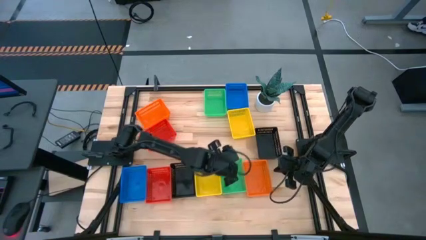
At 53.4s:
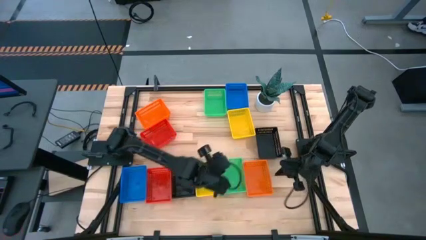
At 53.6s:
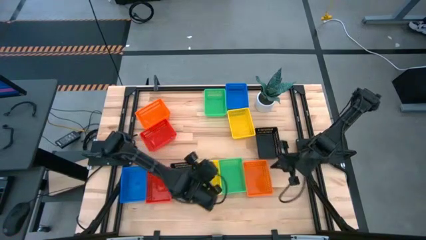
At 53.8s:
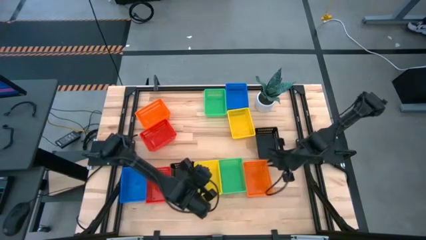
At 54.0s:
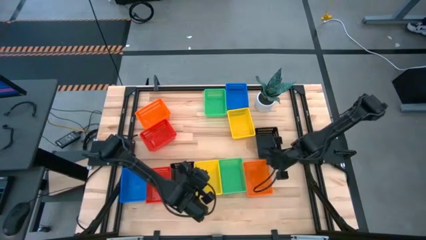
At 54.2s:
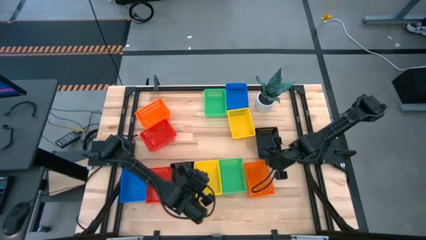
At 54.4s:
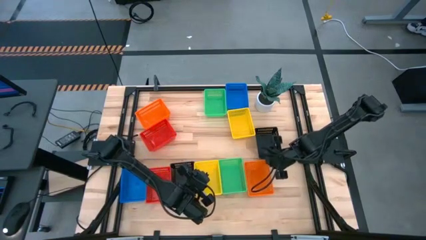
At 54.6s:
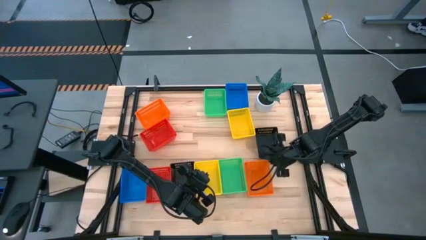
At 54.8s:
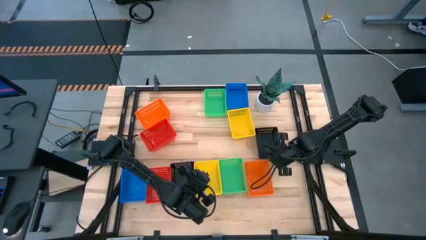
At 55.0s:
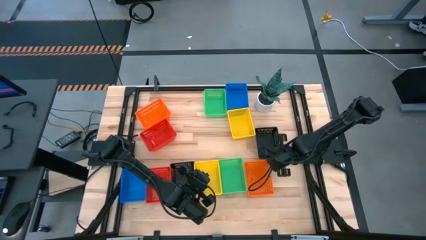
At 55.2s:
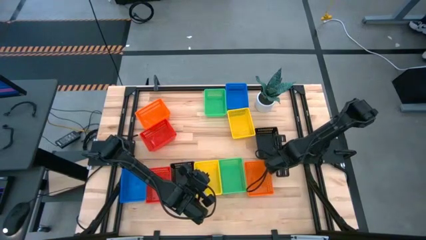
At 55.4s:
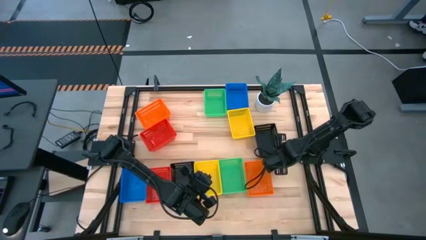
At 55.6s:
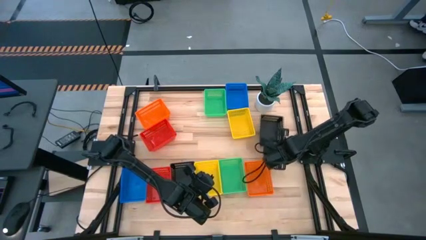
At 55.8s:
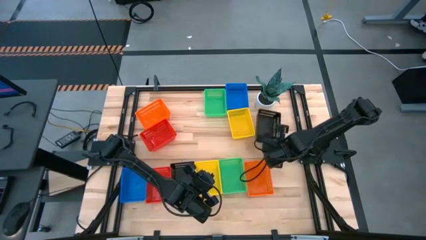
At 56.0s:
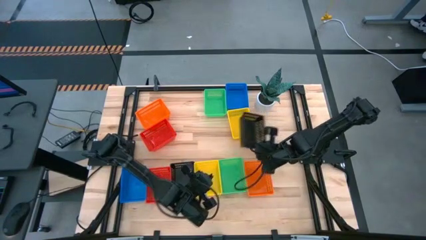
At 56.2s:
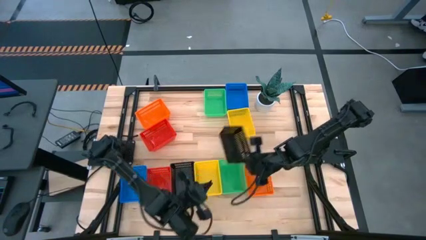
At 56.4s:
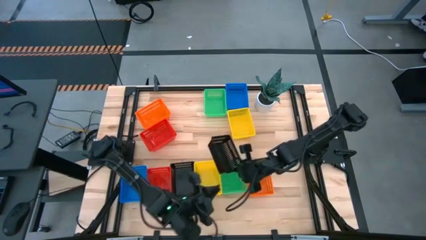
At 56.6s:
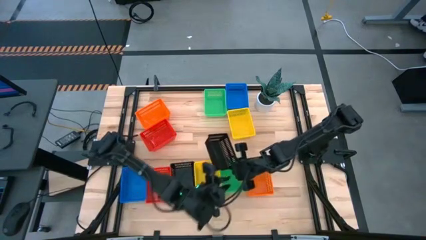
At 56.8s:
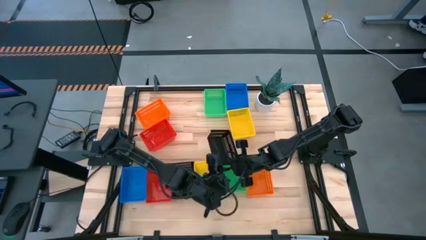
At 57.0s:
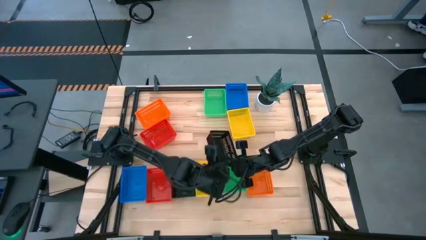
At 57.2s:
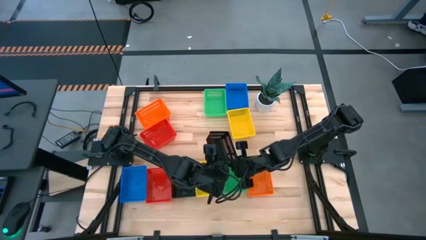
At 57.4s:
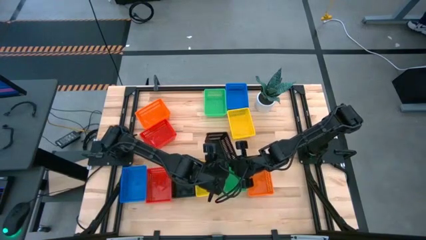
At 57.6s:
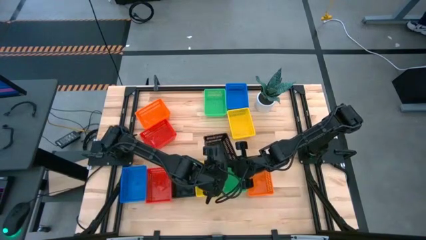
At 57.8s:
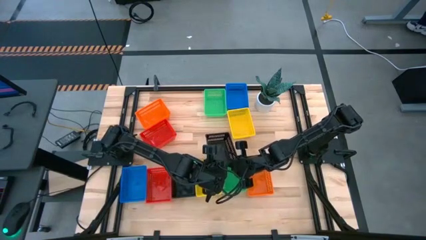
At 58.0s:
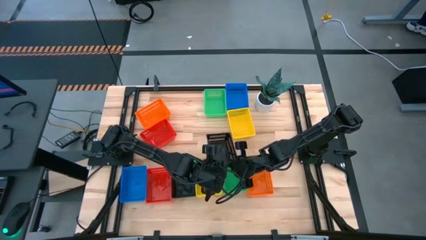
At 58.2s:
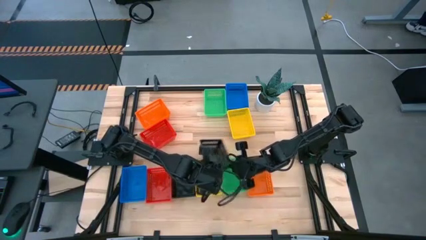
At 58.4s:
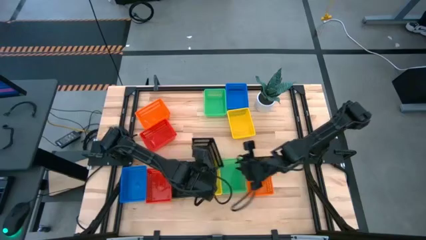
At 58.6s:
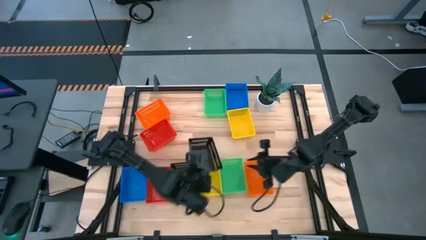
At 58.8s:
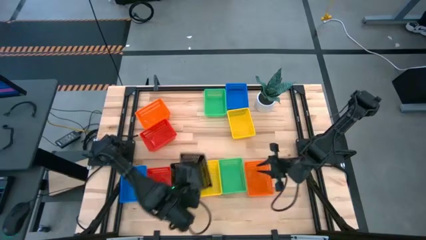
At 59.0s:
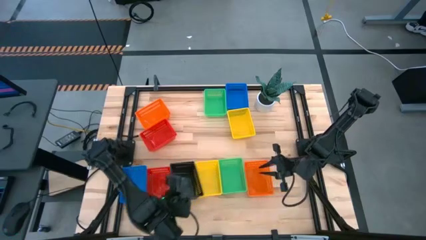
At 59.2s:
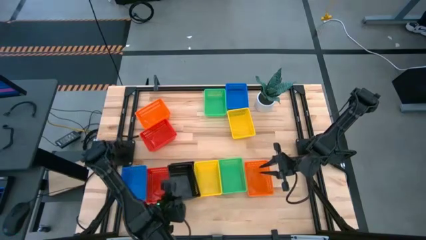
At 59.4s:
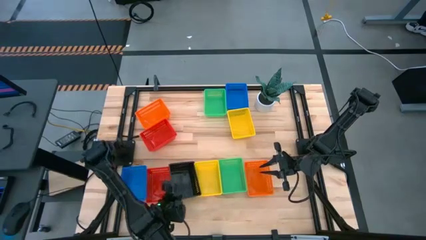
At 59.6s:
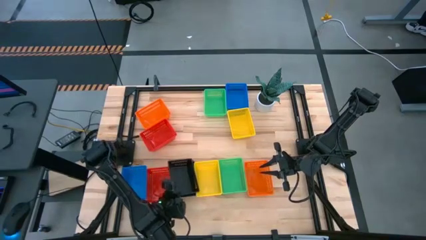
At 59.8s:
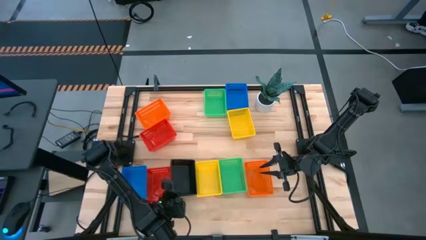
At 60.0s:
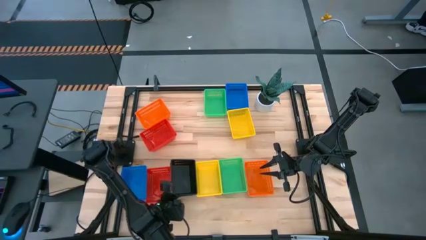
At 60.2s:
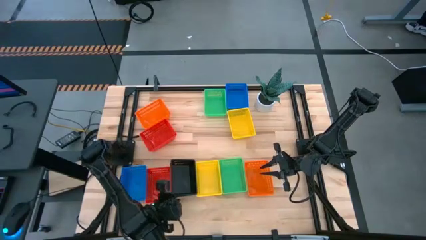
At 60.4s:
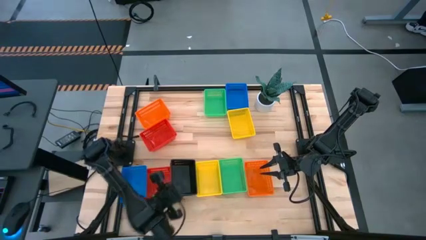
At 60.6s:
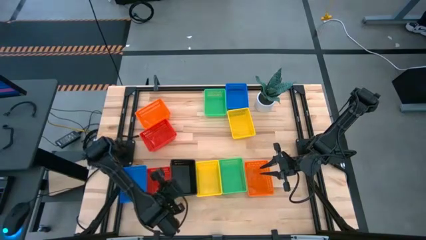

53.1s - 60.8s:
Stack the top black bin on top of the black bin

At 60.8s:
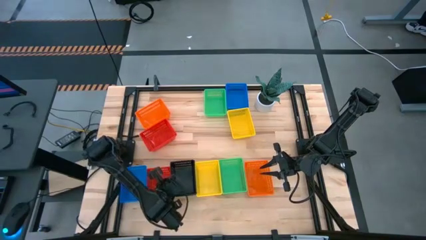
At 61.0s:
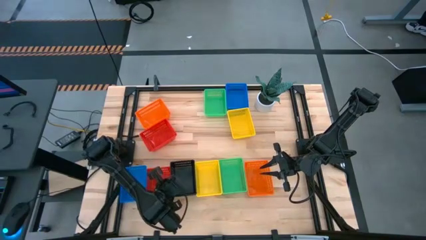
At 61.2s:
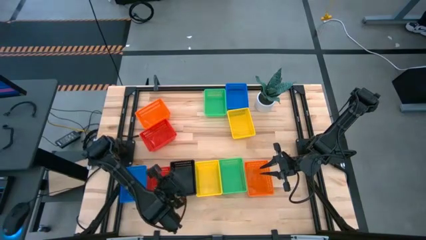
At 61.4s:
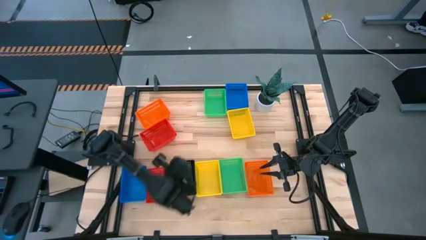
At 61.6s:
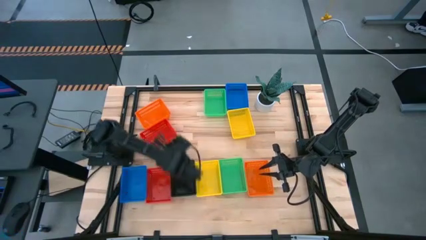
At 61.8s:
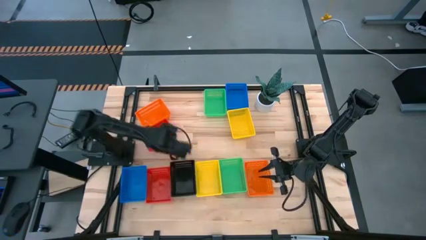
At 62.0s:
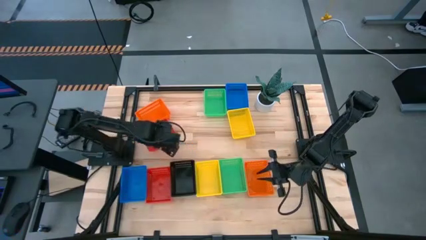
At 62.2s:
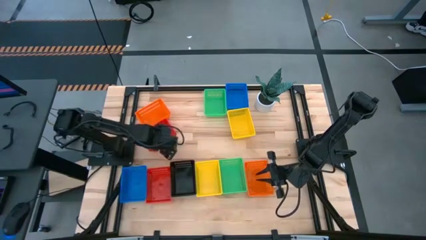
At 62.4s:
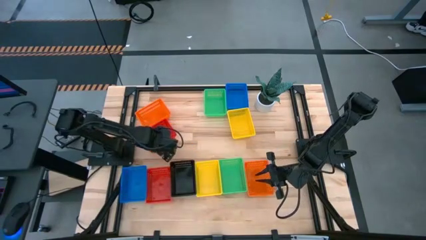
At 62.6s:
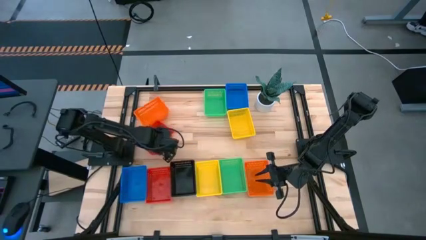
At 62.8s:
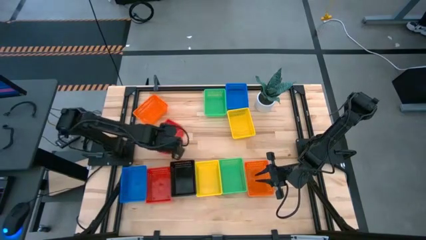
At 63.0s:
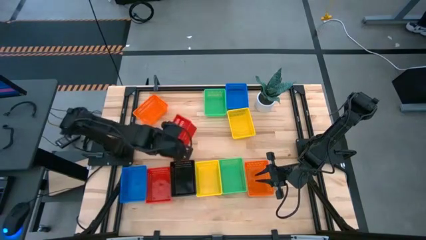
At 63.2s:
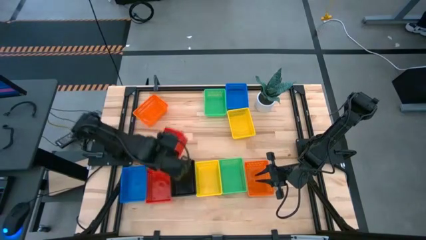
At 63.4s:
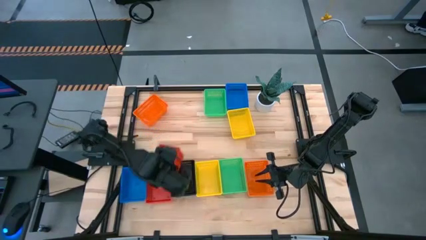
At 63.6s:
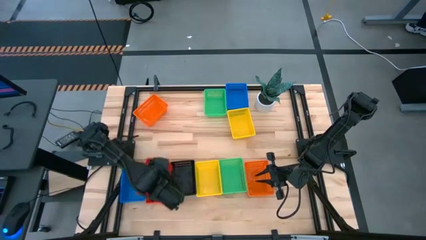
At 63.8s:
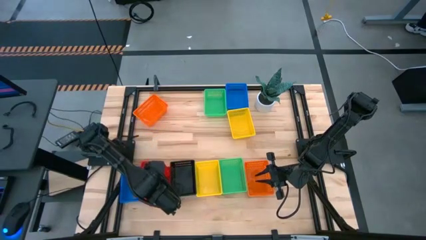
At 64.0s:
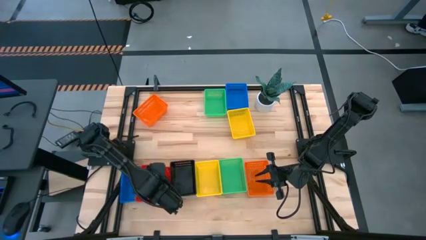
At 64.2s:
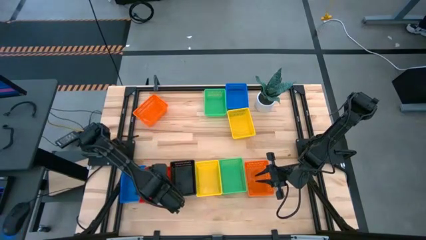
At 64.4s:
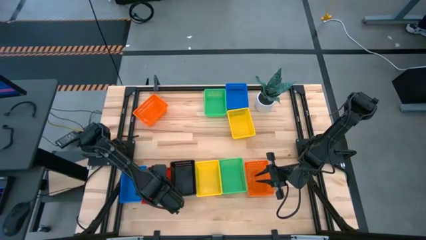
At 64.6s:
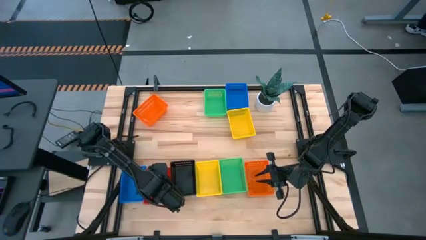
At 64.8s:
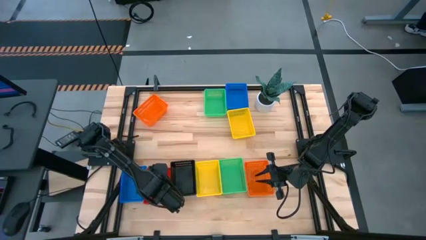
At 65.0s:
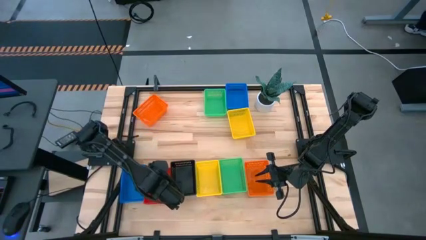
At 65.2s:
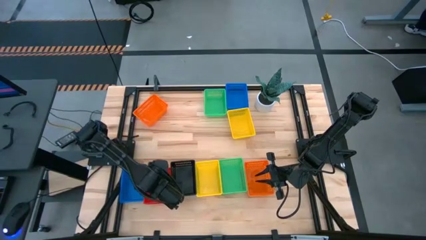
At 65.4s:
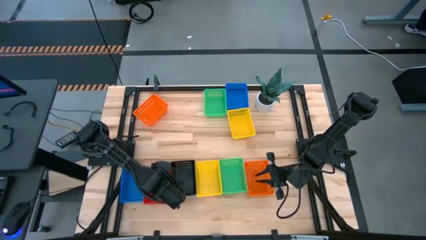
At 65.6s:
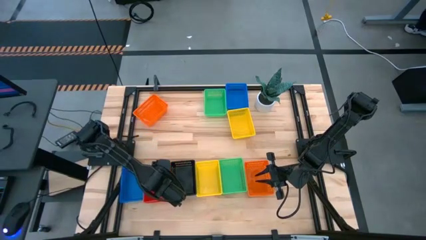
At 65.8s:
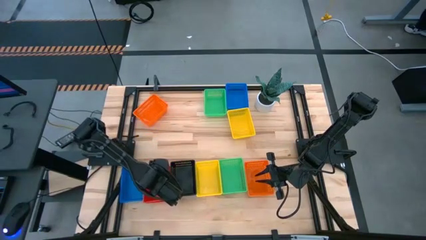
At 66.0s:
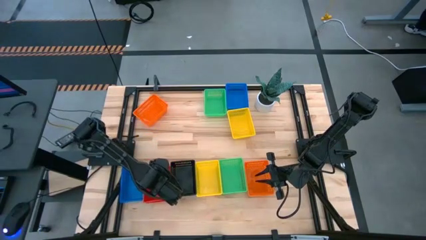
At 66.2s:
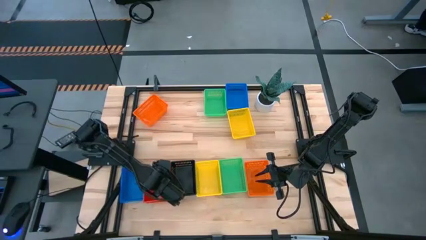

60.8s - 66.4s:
Stack the top red bin on top of the red bin
